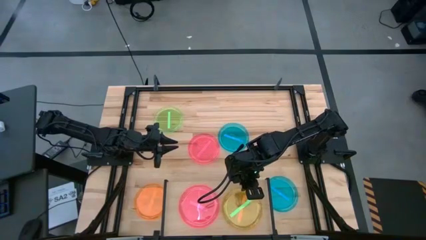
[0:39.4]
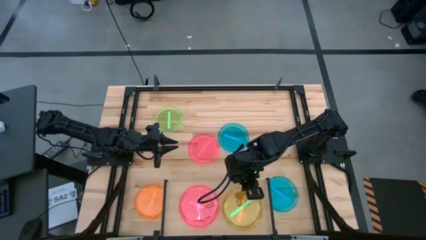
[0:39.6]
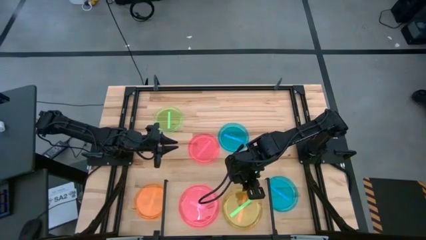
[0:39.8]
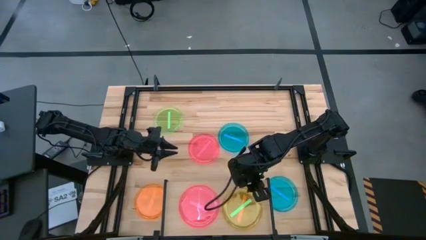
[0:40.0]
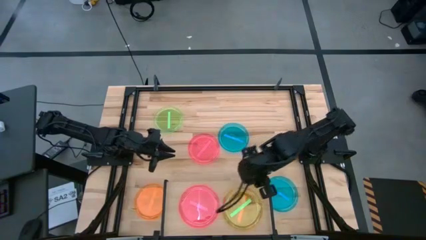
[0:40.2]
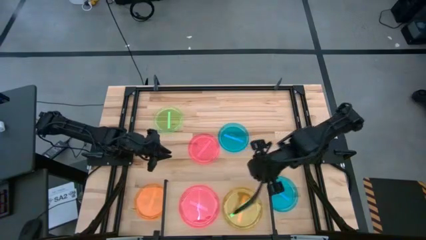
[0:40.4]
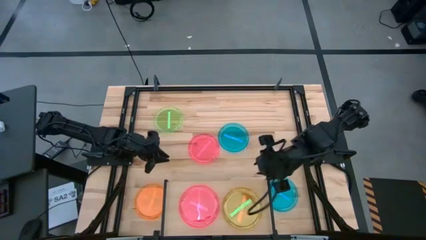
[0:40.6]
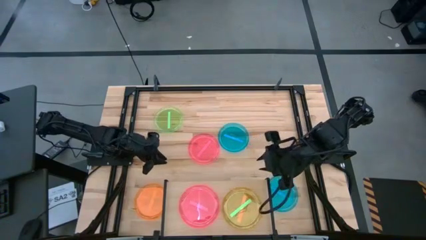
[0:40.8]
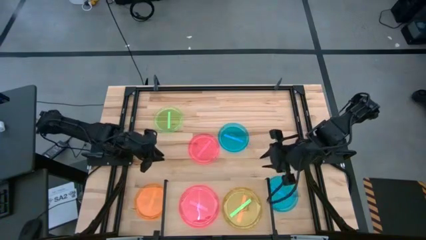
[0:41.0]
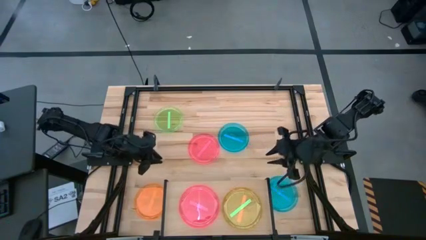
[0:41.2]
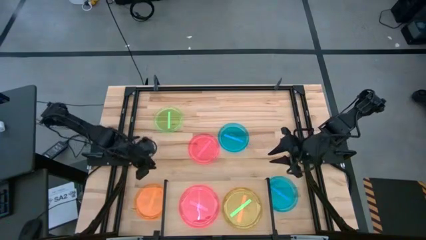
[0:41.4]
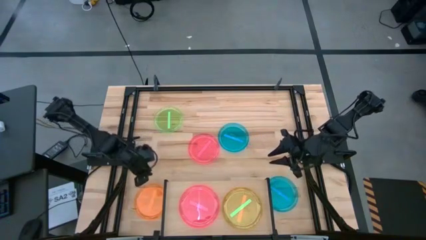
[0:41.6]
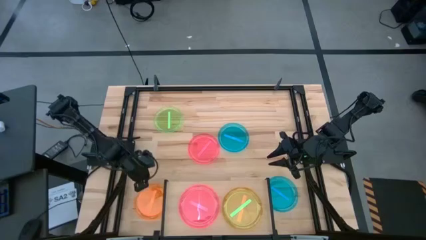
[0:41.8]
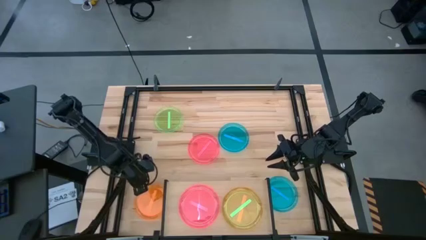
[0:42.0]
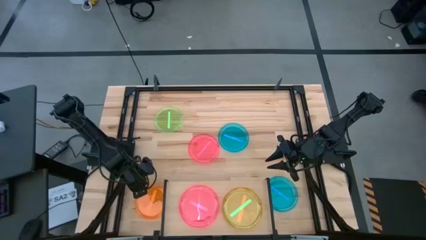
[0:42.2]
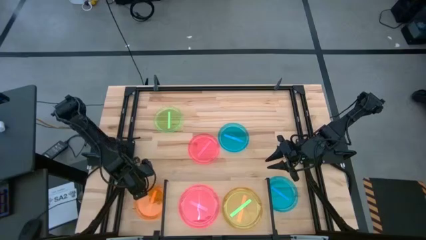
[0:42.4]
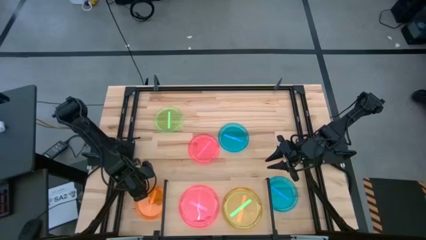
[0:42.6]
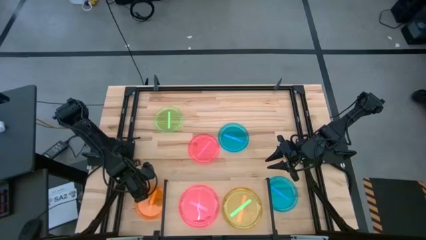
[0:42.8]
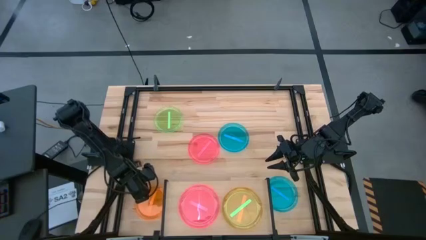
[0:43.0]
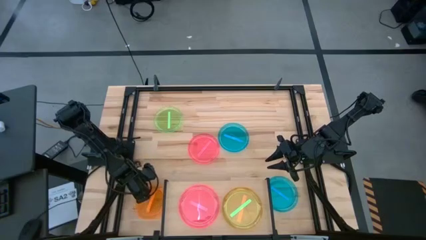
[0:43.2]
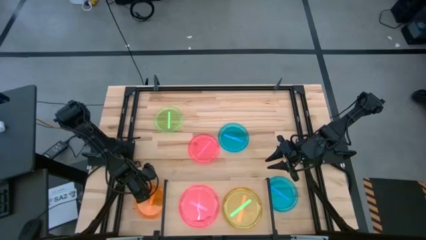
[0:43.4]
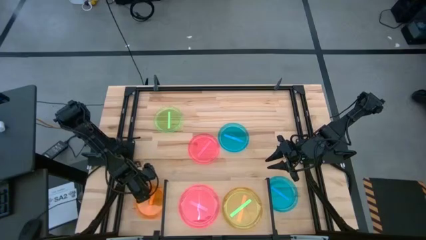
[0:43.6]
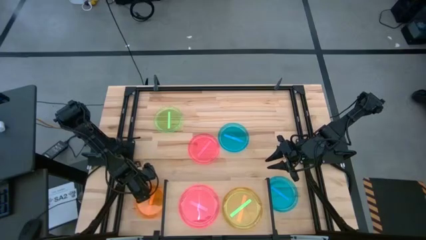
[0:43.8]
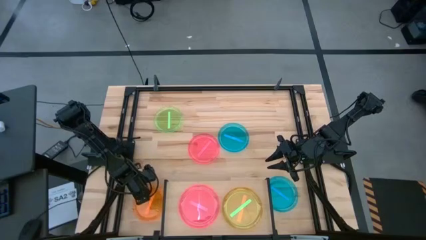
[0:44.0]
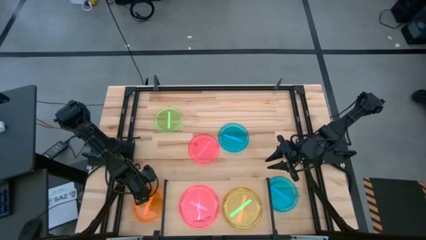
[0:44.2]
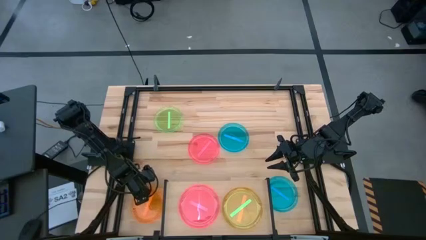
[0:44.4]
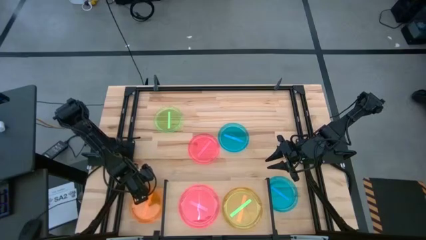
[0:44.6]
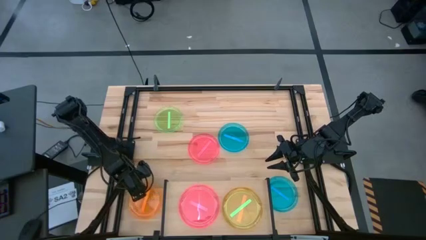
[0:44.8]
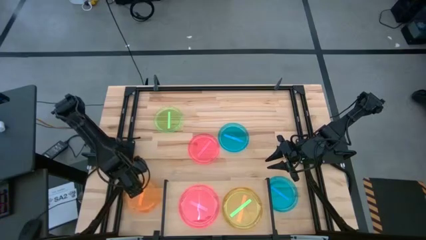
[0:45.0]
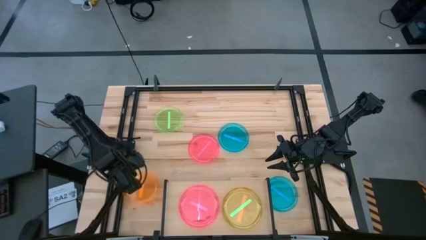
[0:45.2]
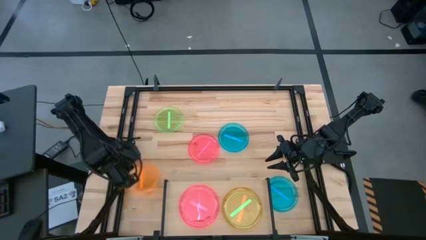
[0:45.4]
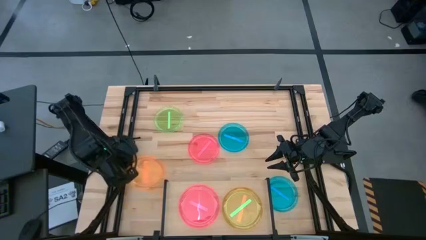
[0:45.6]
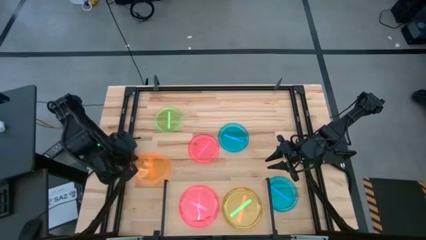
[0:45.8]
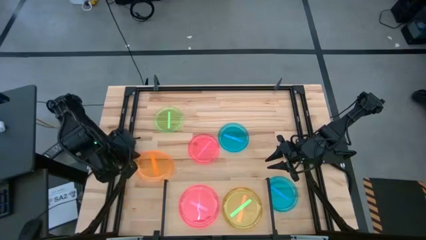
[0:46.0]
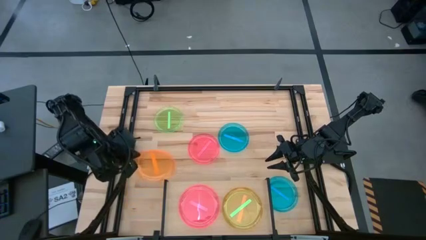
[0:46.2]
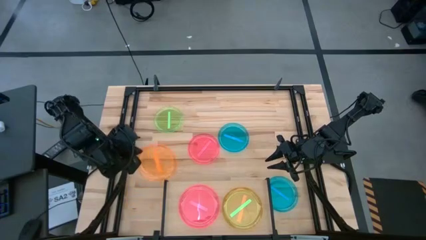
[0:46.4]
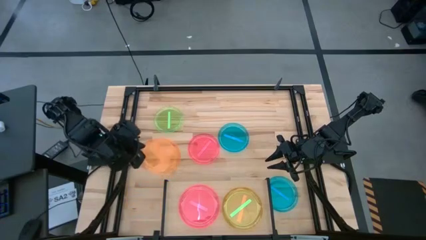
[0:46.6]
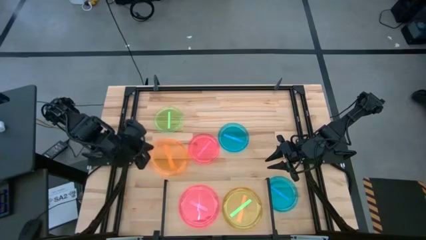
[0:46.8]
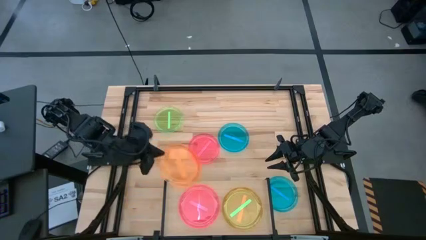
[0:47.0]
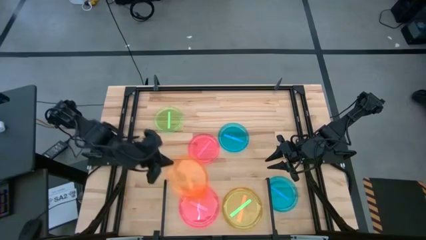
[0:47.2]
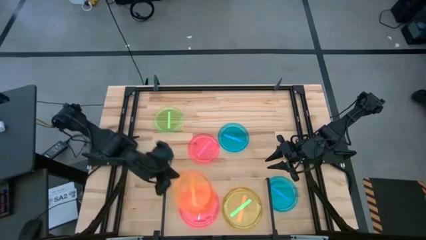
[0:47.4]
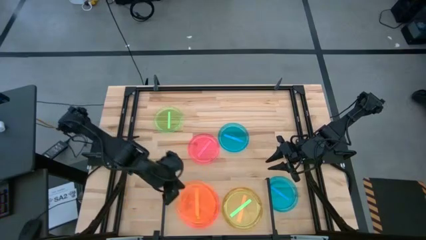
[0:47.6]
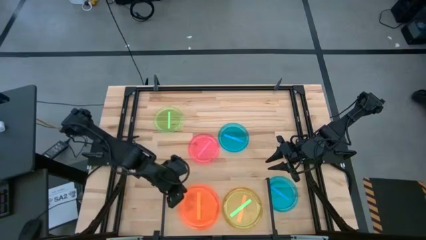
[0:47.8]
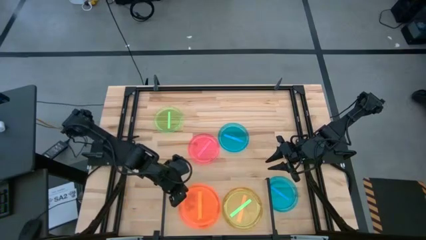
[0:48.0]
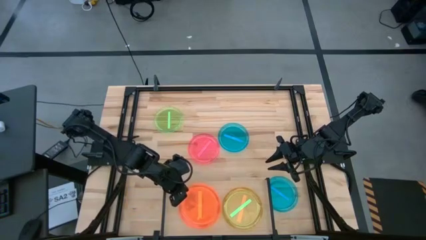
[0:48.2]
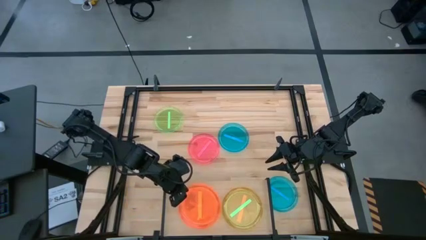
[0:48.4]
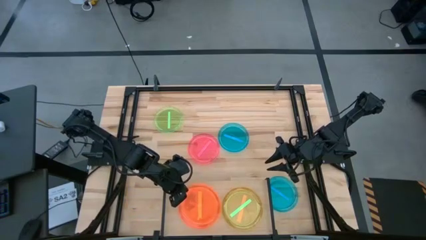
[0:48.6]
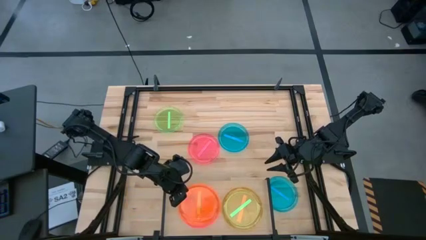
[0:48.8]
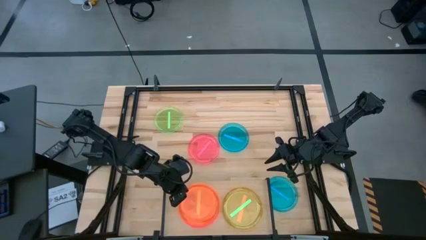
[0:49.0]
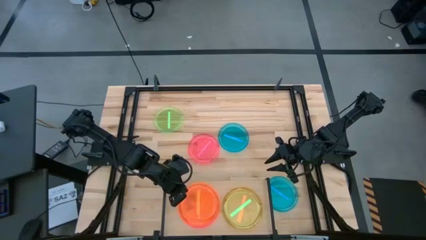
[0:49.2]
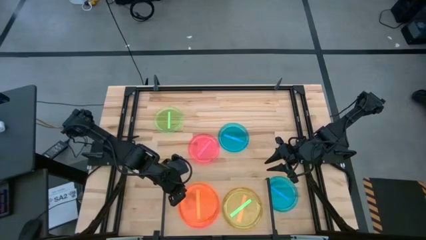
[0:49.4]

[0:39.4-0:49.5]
Task: Place and stack plates onto a shelf
Stack the orange plate on top of the the pink plate on the shelf
